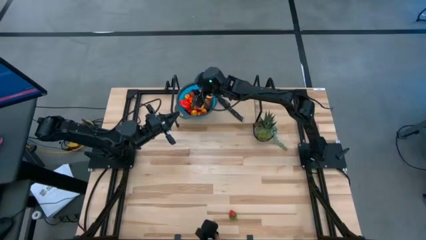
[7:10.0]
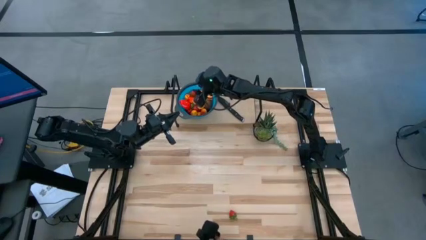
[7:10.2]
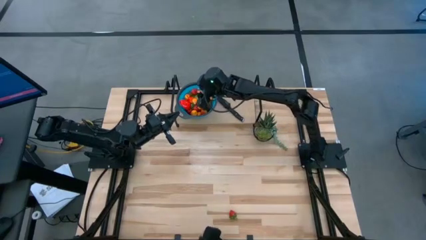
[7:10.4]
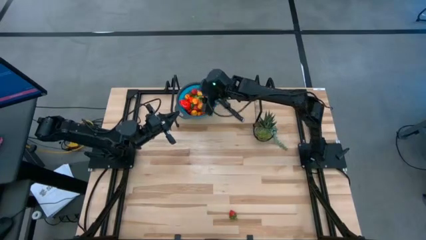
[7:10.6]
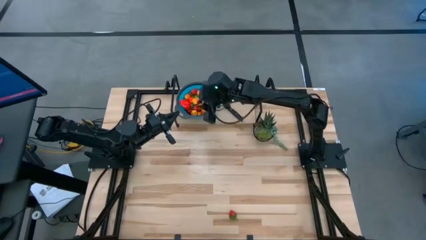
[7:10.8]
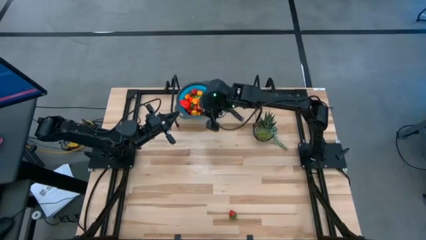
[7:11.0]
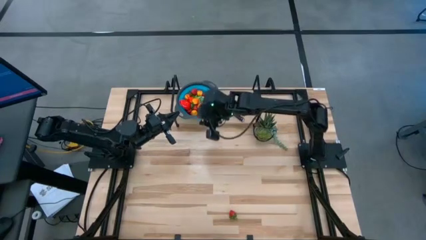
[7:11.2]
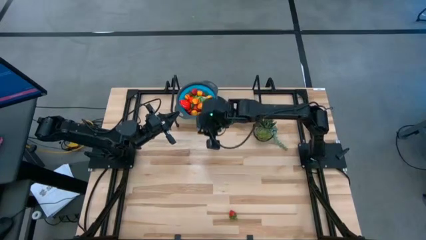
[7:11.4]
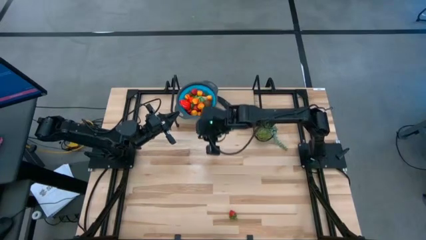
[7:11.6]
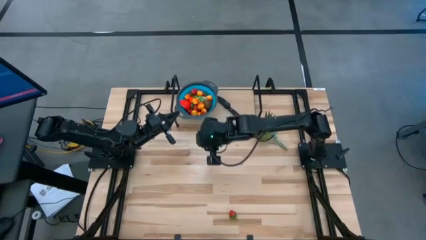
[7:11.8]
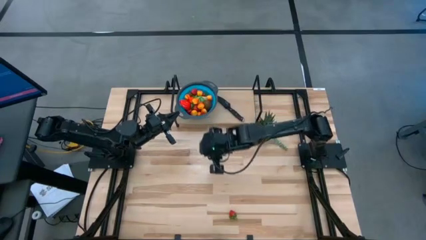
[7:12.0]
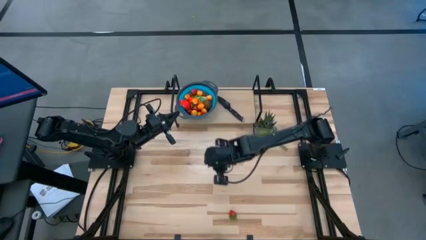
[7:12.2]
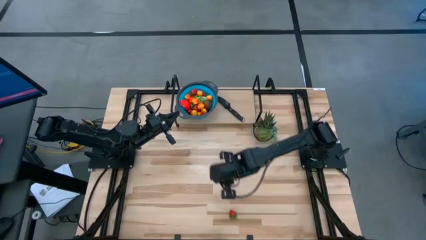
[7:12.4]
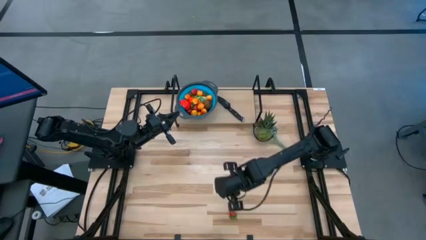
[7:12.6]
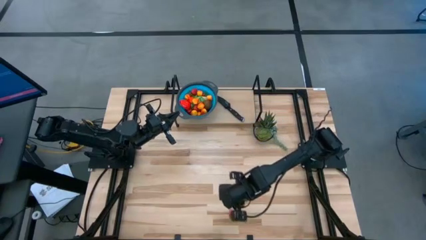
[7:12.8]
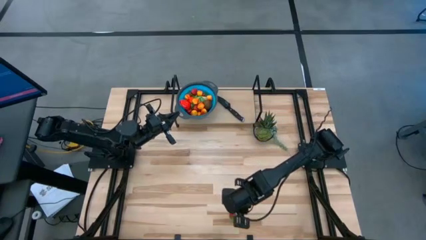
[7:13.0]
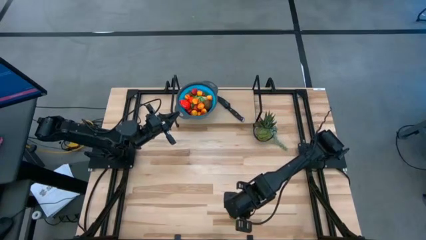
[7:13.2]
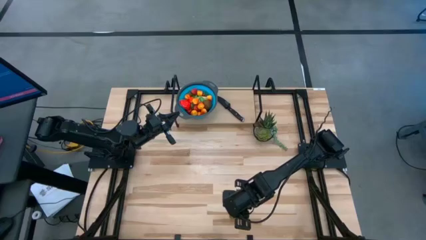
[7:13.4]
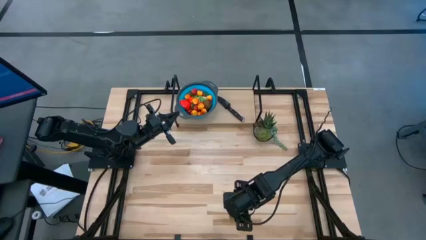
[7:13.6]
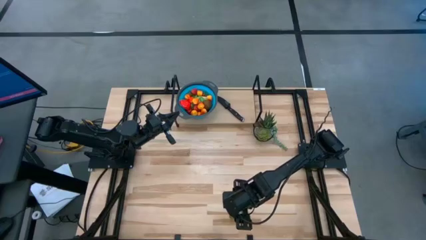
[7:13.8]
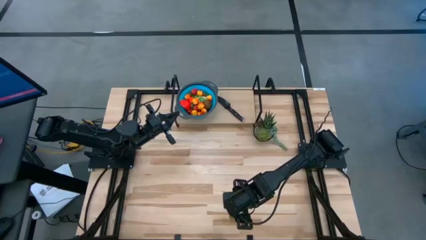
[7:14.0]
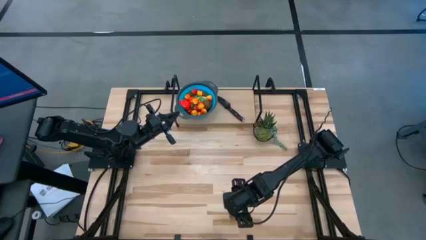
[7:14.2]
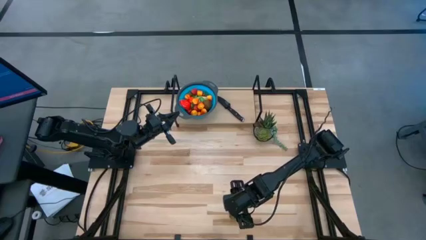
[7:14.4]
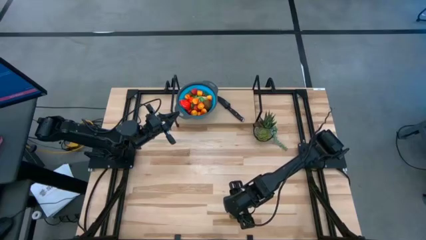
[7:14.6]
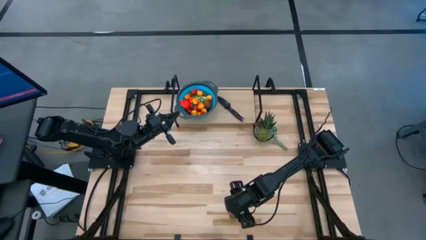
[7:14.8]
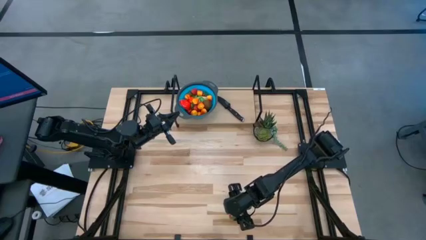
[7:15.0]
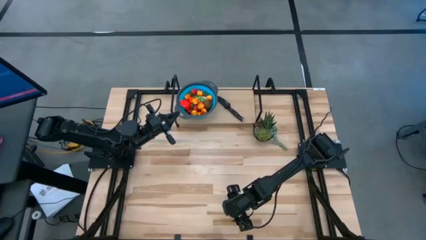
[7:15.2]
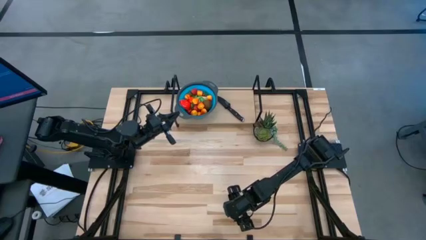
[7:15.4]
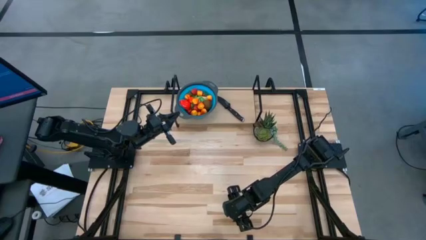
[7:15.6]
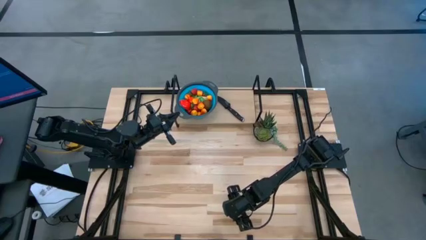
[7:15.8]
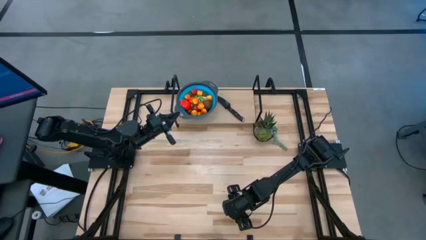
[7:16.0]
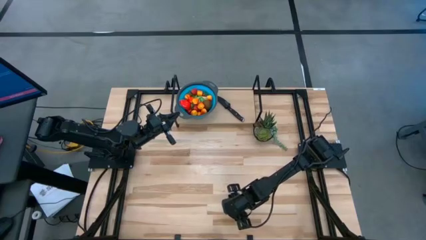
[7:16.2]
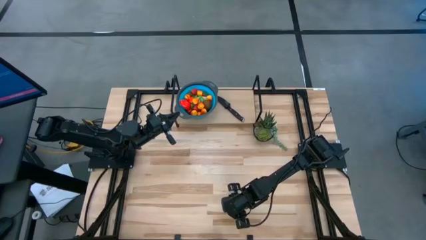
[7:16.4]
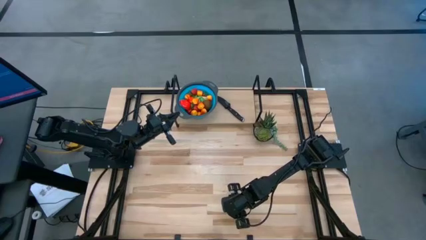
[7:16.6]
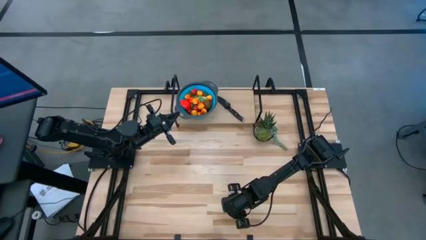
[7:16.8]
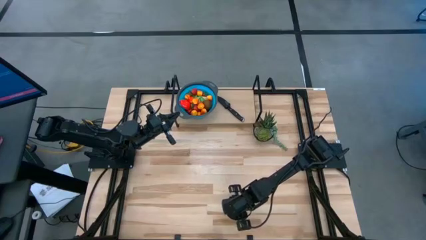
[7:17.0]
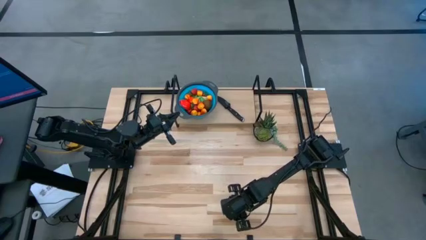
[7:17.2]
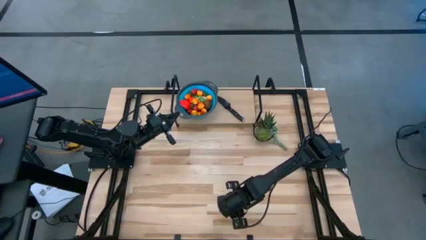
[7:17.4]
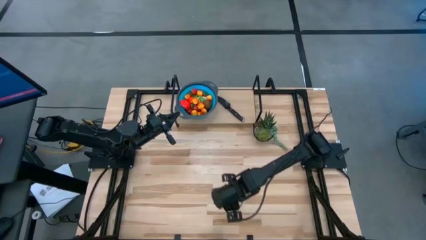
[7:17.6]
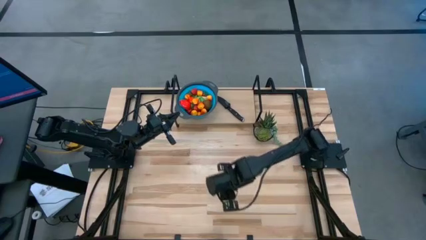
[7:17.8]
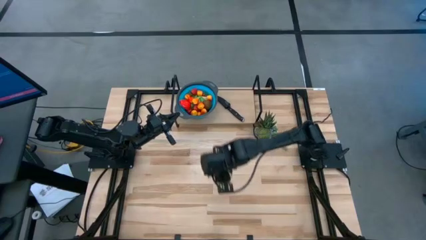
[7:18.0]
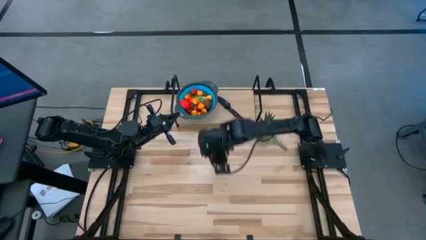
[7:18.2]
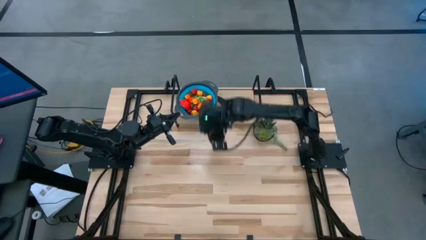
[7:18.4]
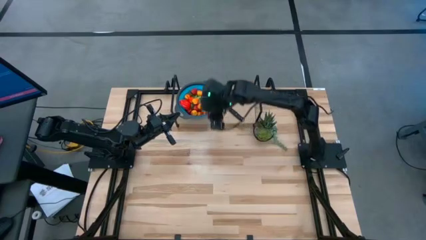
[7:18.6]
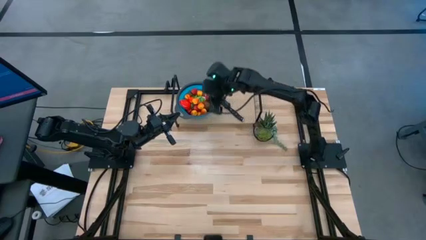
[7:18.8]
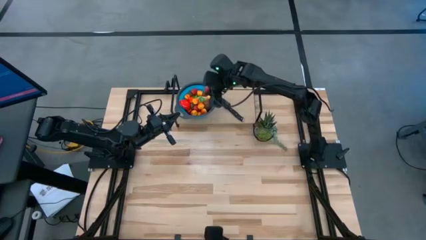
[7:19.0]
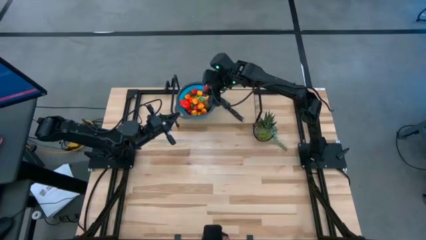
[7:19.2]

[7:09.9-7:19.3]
Task: Pick & Place Fruit
Put the strawberry into the basket

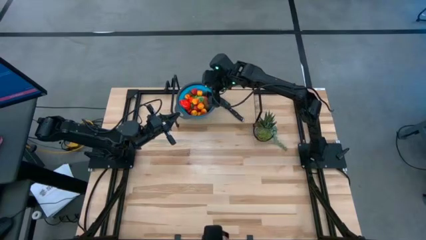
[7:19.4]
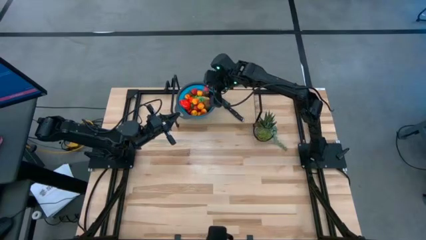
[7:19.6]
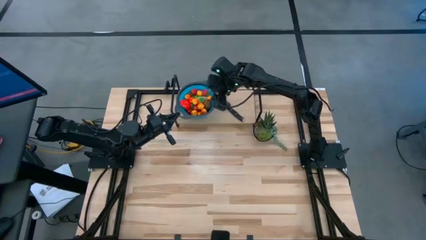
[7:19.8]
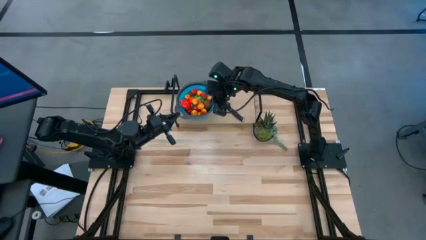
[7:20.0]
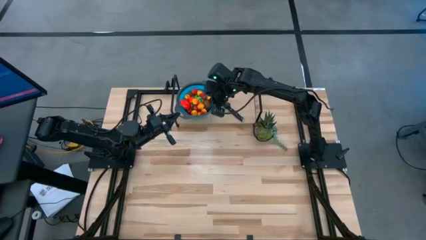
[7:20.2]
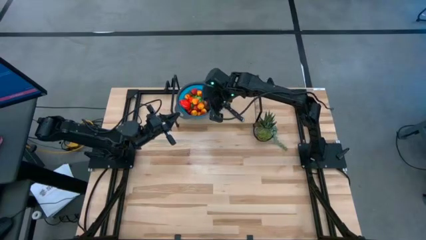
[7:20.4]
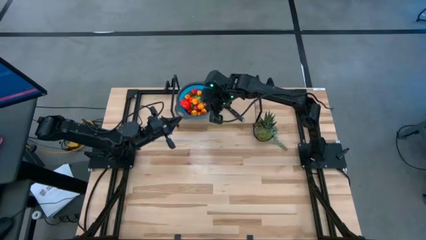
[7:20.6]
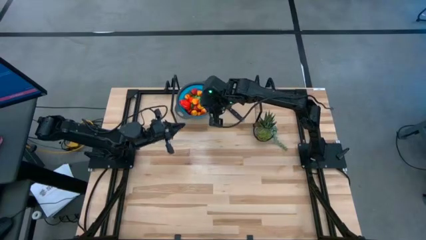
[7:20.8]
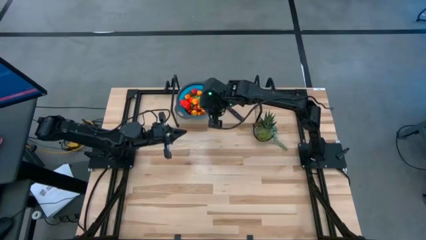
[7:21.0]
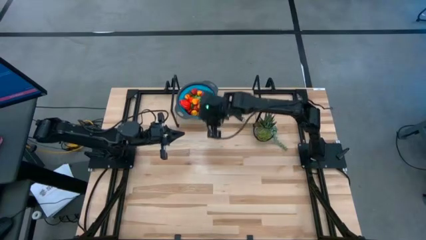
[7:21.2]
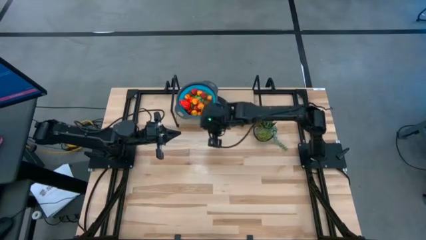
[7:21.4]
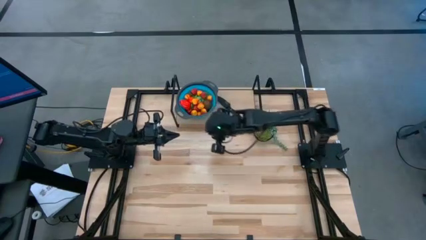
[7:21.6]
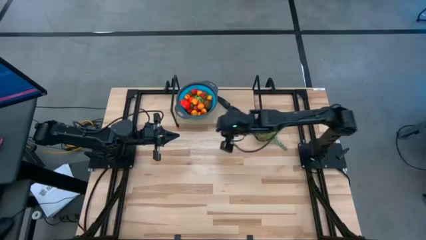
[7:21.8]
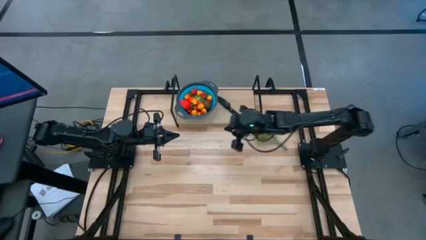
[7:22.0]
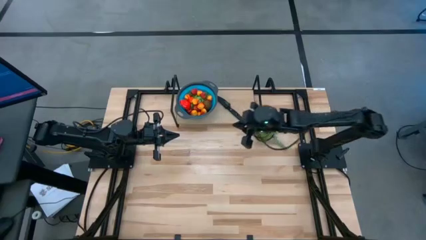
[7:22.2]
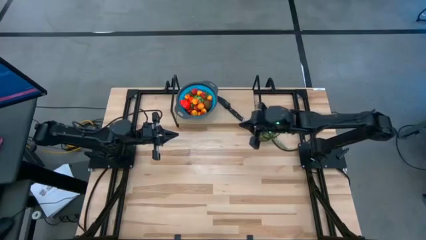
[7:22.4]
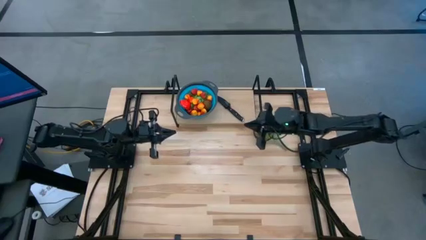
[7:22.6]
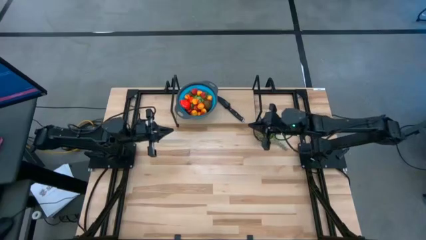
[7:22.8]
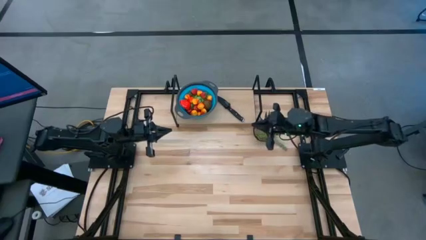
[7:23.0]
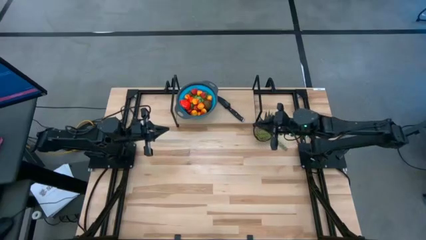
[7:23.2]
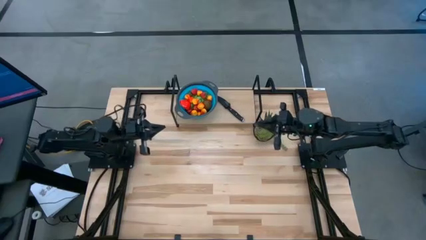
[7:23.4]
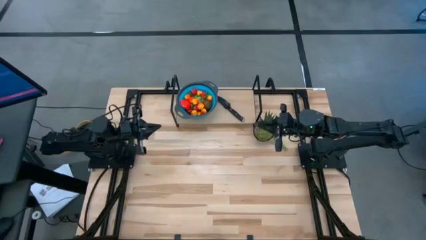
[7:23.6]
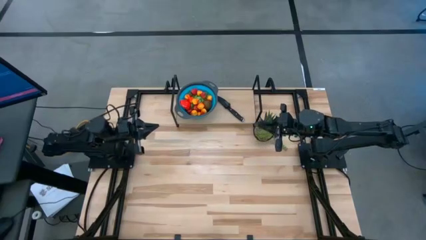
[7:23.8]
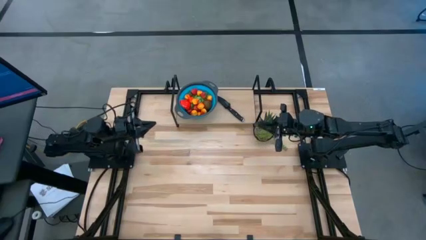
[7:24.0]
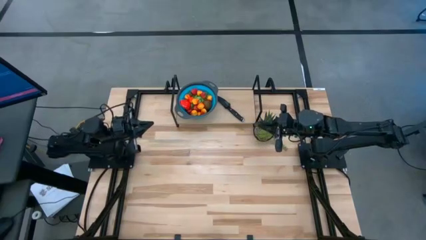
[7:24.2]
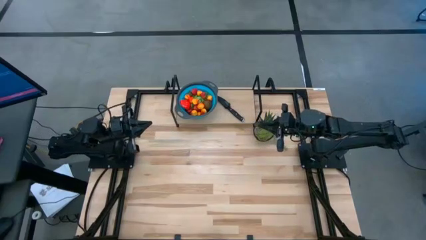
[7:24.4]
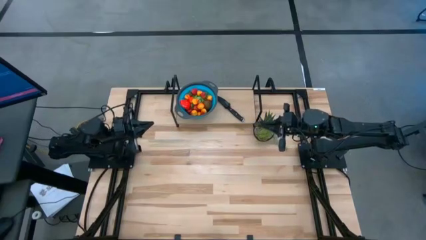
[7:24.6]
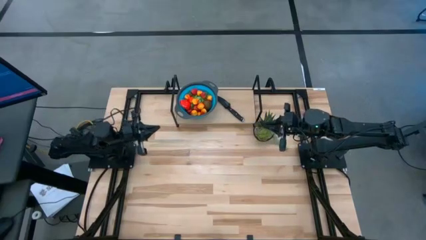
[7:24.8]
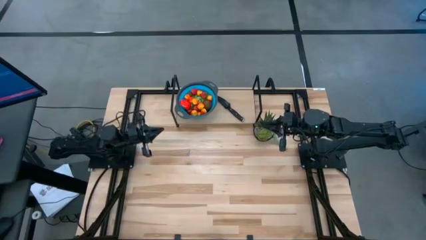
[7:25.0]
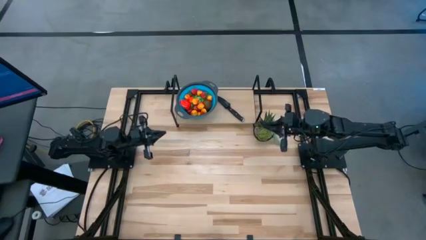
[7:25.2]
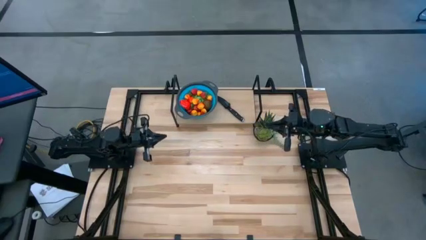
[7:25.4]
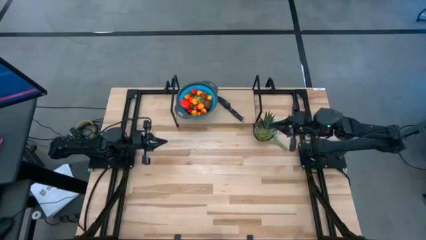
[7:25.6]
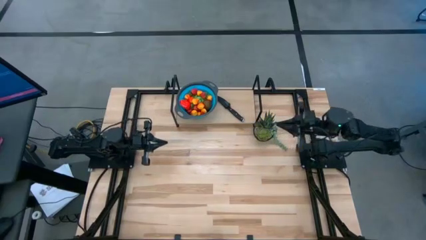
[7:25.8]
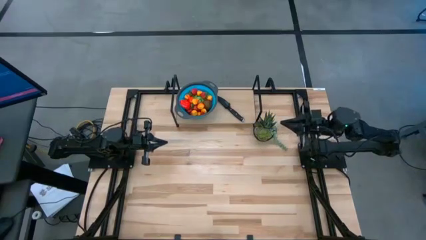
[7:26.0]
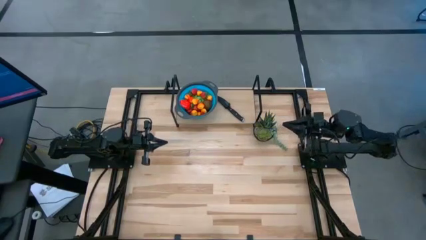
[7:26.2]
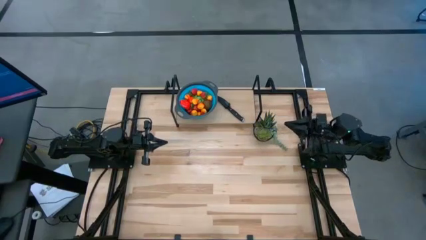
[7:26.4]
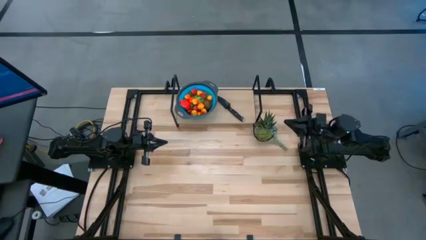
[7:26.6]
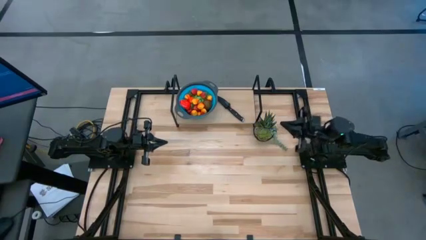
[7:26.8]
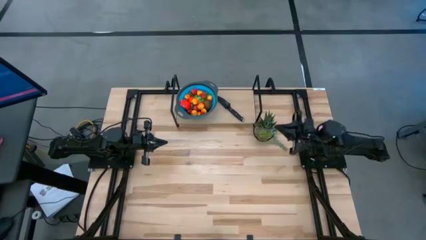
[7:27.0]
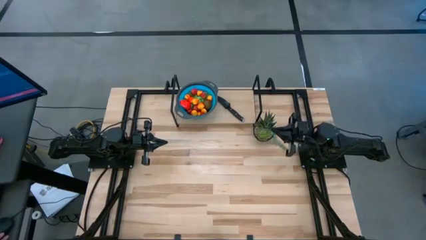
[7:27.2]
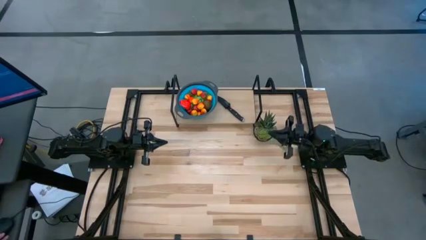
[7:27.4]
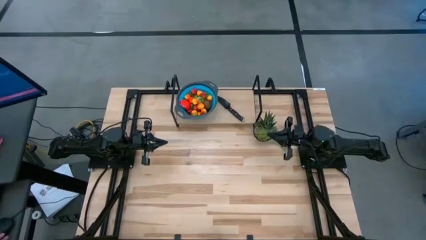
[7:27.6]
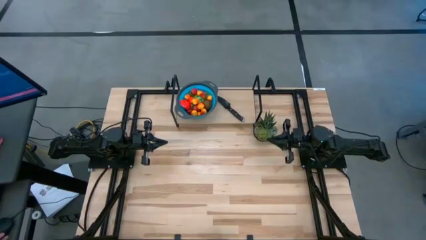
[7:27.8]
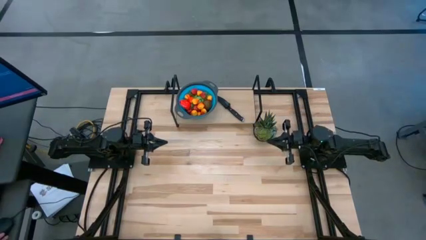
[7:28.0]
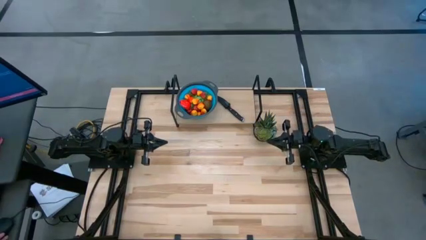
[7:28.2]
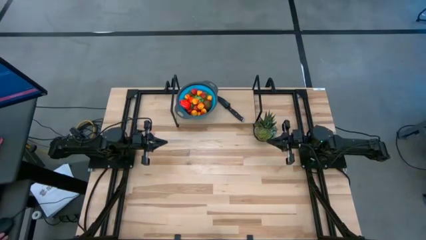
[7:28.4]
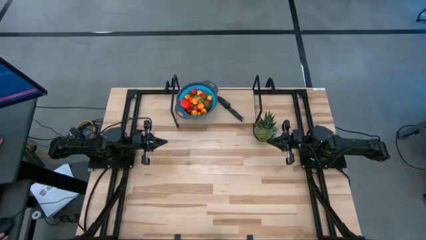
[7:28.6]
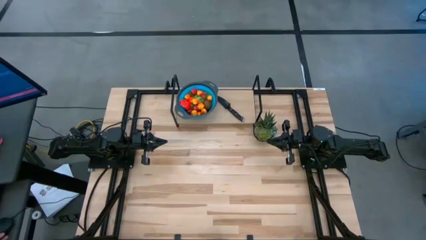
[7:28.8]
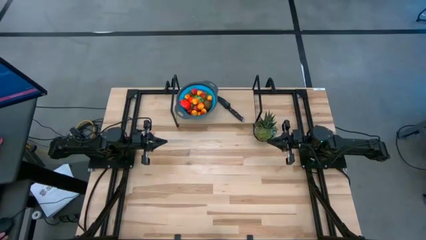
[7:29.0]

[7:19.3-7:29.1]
Return to Home Position
